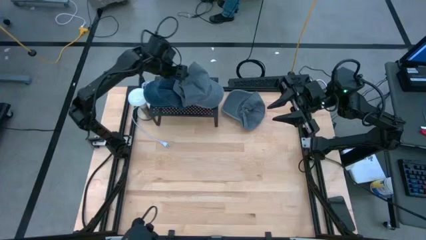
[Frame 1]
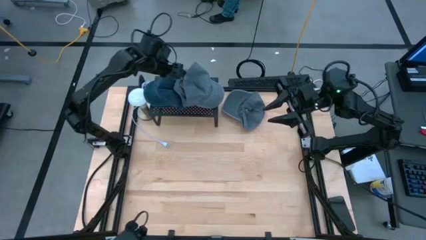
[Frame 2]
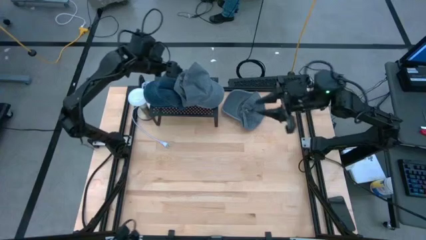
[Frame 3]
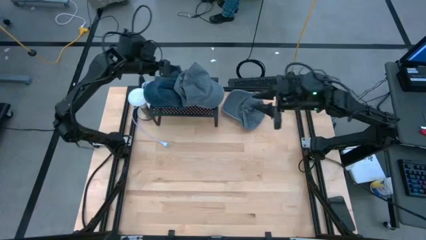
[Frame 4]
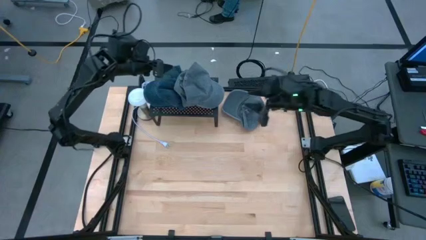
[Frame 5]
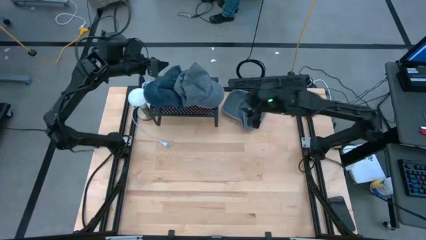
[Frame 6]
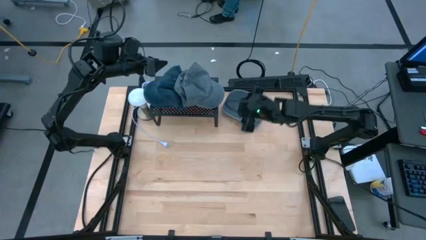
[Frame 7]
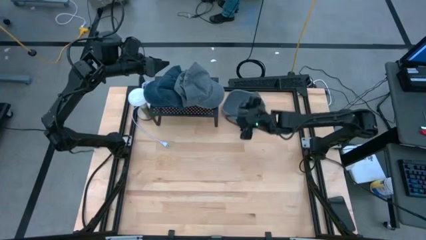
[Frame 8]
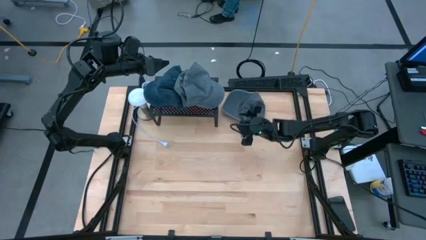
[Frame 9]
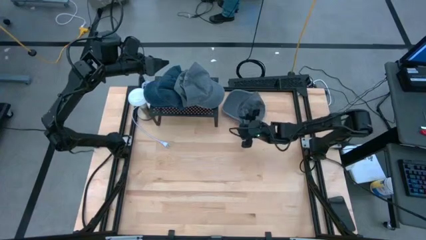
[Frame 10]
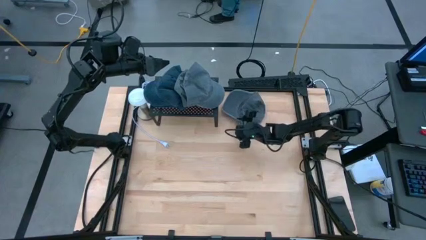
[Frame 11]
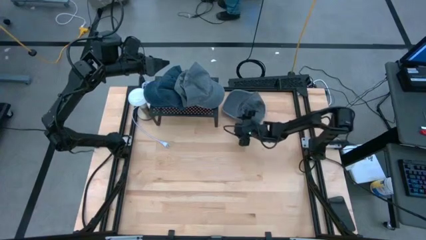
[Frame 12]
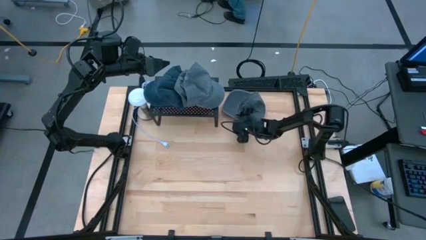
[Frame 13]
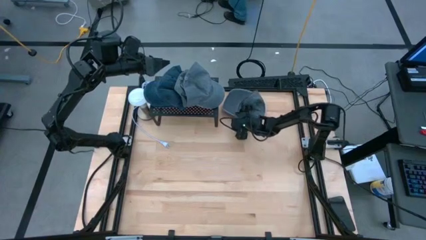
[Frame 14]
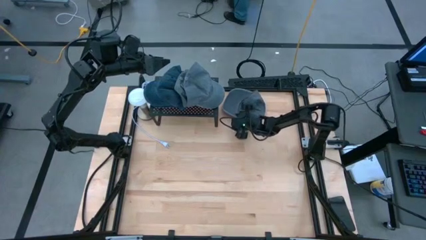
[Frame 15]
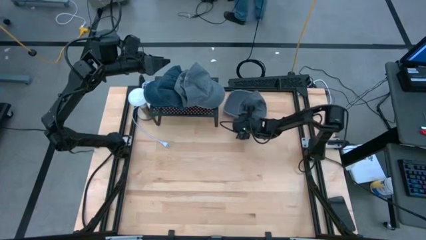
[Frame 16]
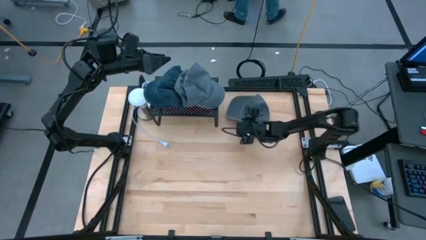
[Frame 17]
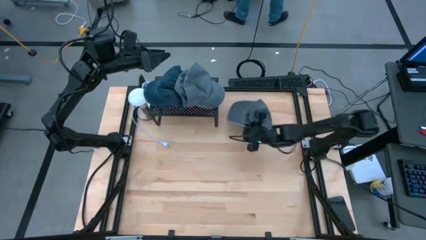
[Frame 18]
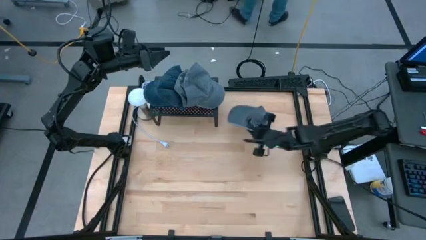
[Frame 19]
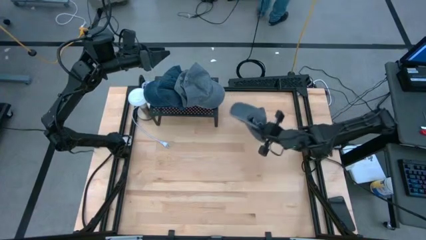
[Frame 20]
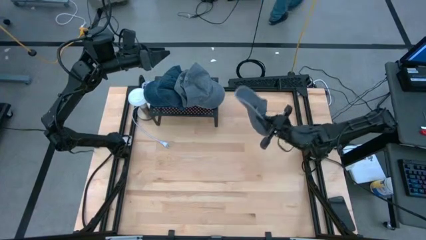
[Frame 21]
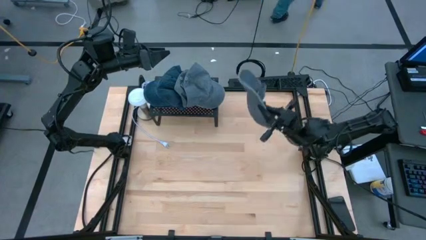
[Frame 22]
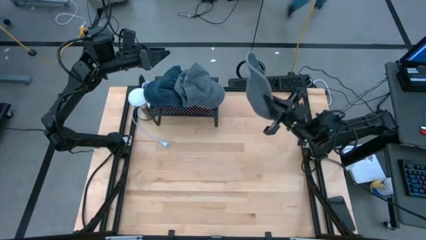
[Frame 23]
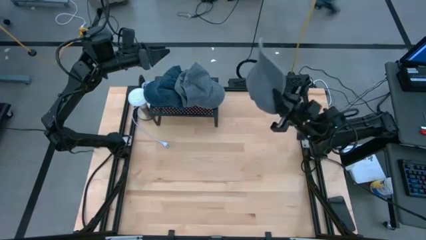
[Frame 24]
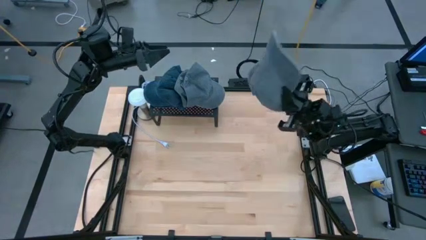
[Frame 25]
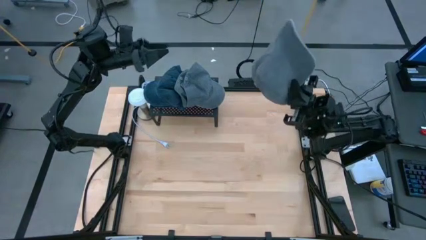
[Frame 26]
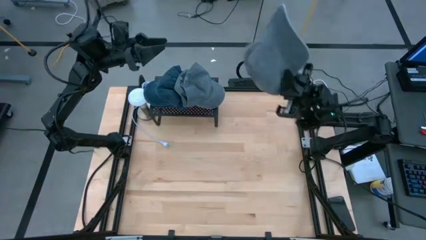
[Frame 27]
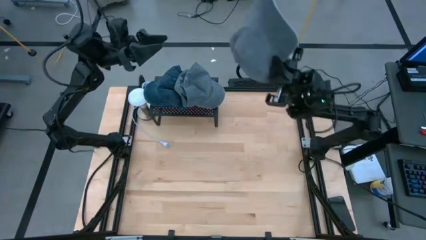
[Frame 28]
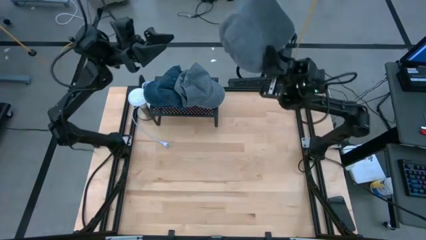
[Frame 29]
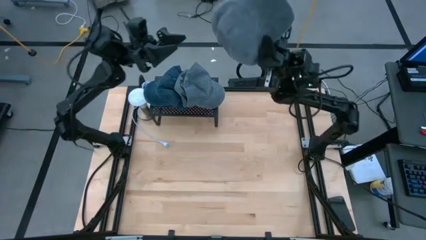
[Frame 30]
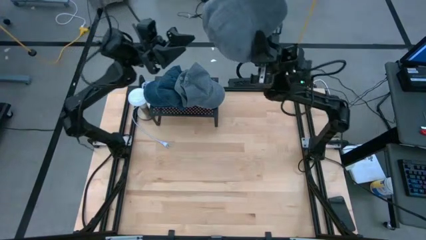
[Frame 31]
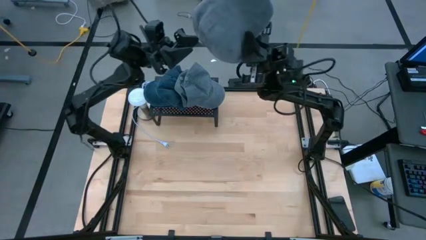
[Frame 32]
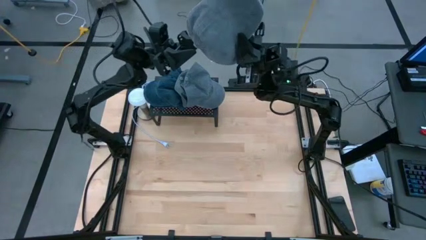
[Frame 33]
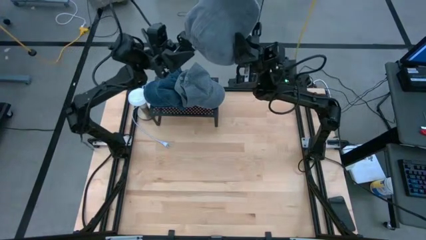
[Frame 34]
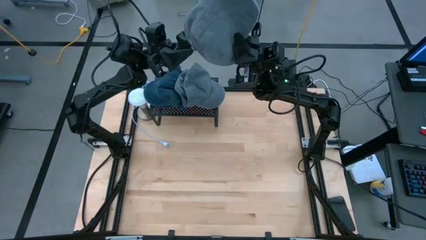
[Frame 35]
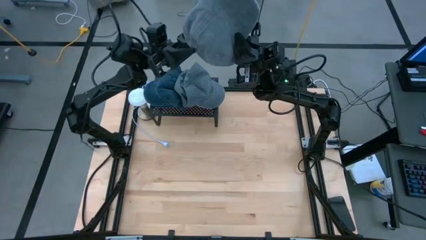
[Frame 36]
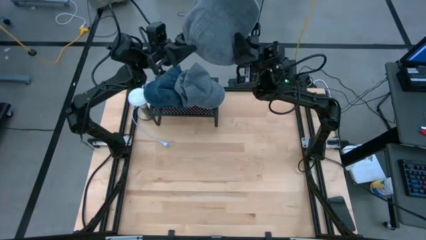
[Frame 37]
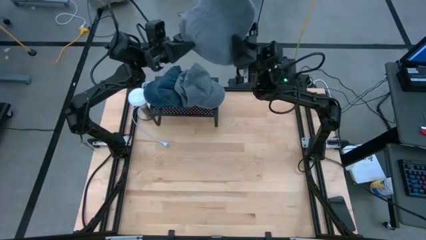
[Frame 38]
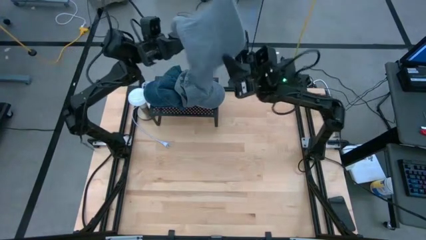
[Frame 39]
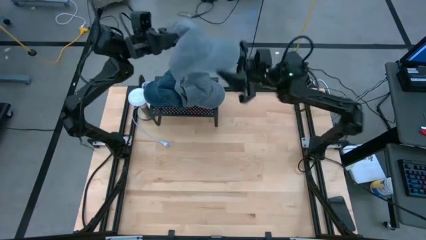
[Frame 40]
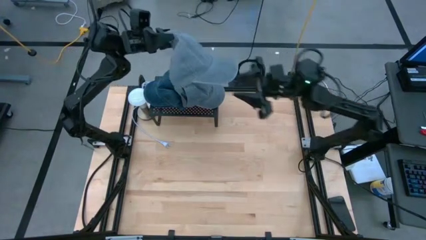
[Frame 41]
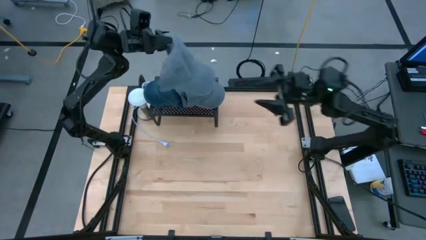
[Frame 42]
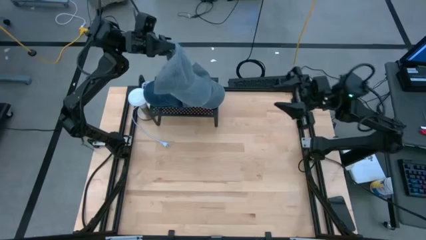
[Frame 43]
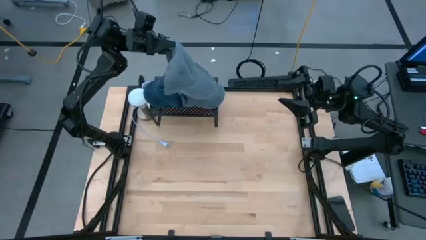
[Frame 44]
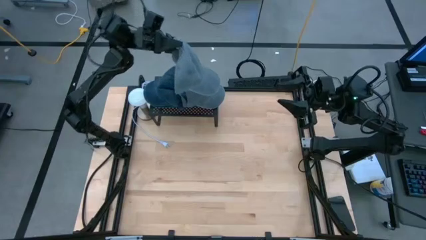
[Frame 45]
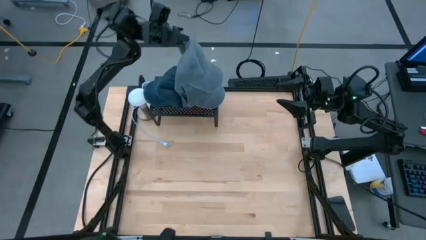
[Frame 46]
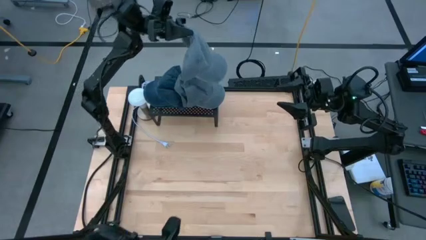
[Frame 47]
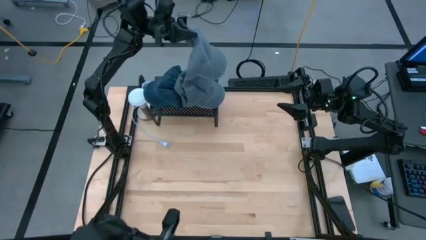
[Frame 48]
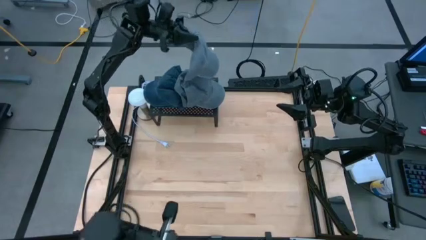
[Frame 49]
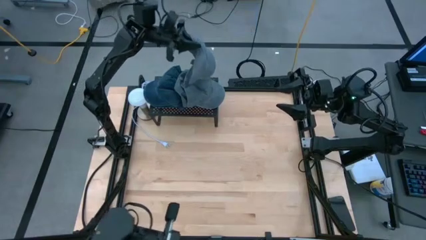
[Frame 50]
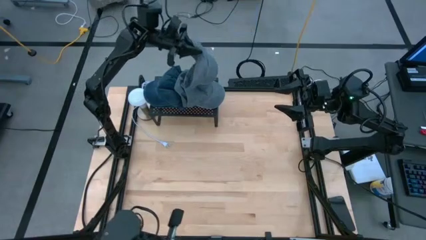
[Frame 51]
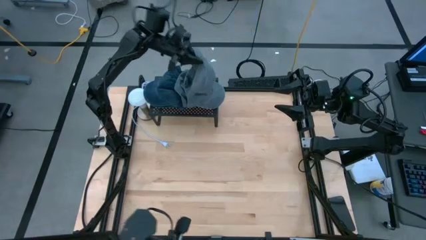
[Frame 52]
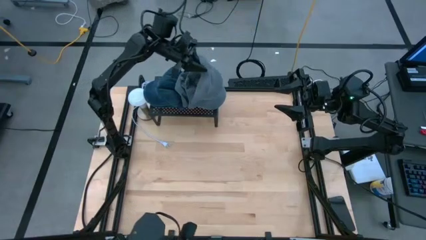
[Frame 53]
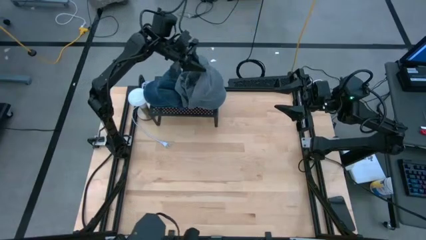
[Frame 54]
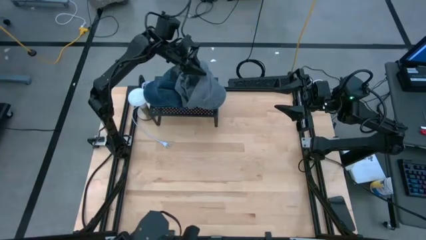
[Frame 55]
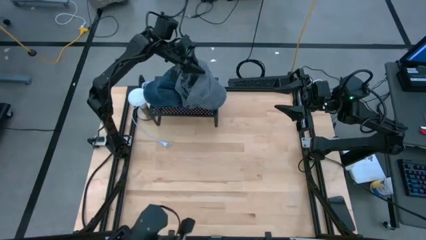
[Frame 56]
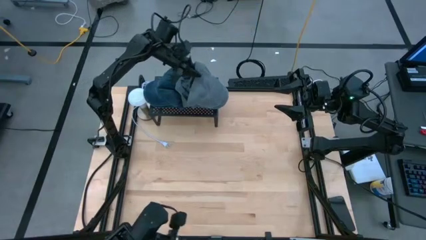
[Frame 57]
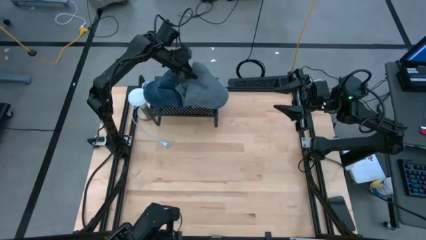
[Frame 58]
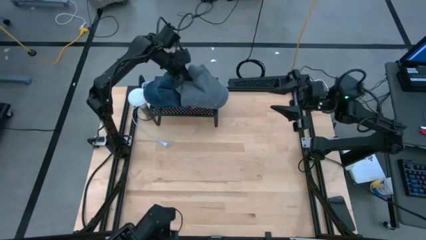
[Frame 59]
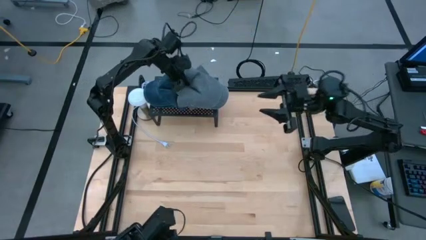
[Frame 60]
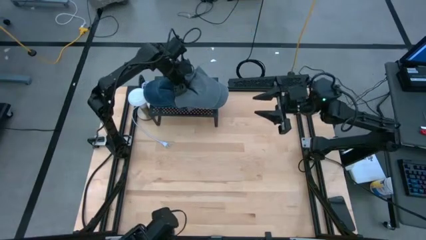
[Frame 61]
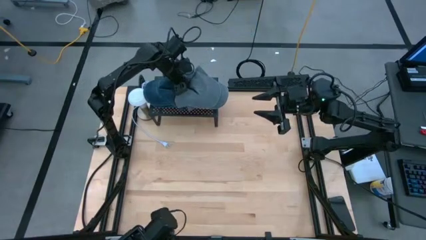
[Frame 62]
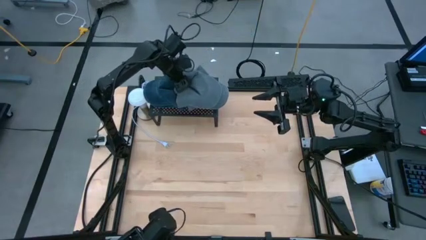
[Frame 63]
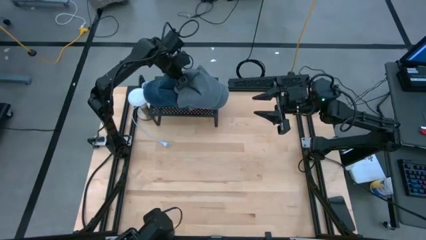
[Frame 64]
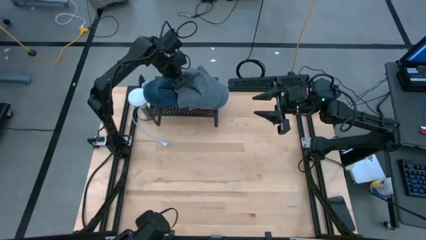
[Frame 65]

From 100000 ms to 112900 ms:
Task: Pick & Place hat
Stack the gray cap on the other gray cap on the shelf
